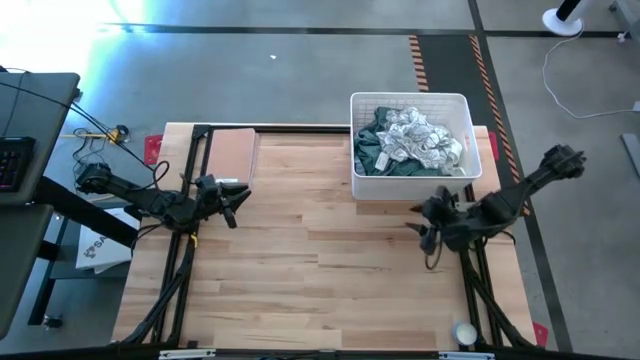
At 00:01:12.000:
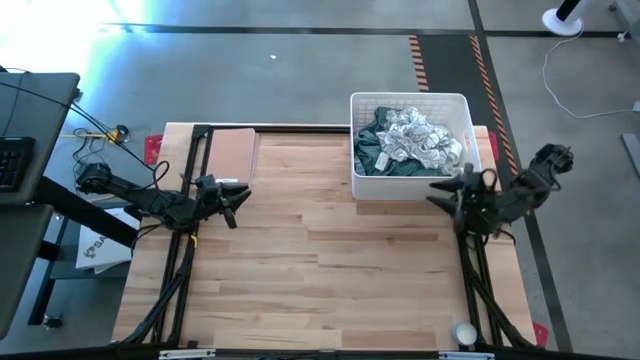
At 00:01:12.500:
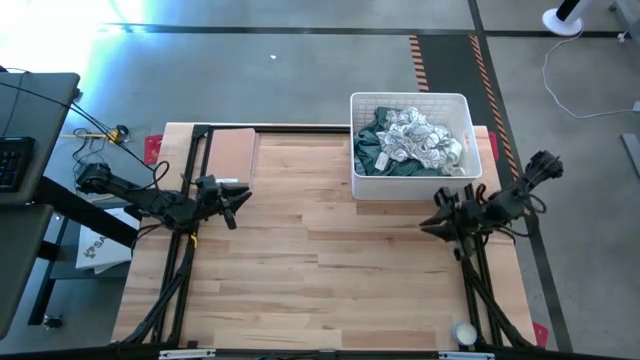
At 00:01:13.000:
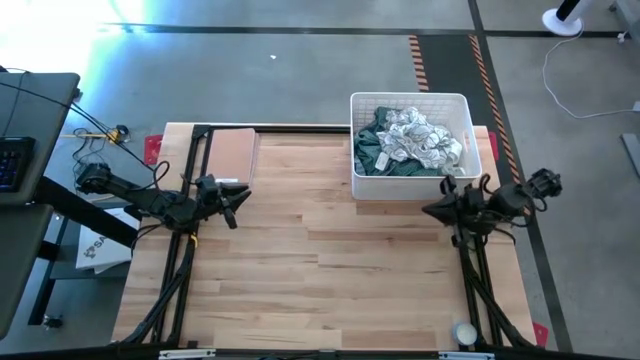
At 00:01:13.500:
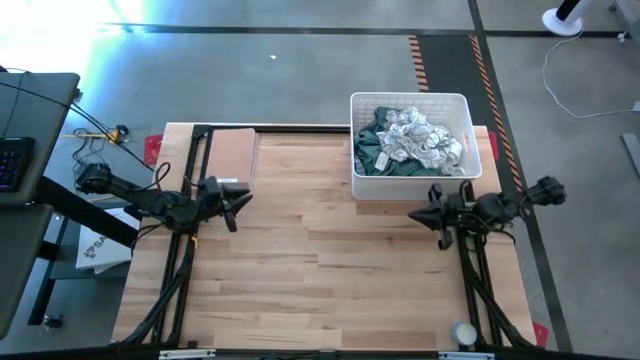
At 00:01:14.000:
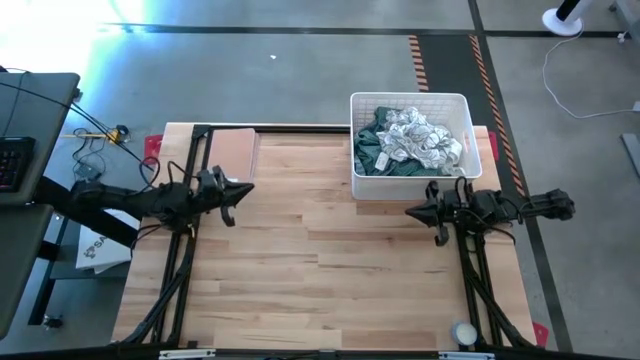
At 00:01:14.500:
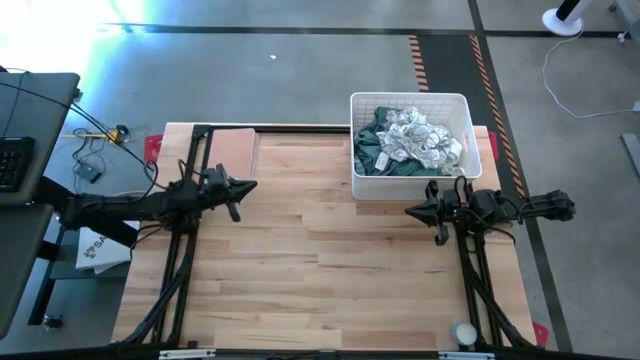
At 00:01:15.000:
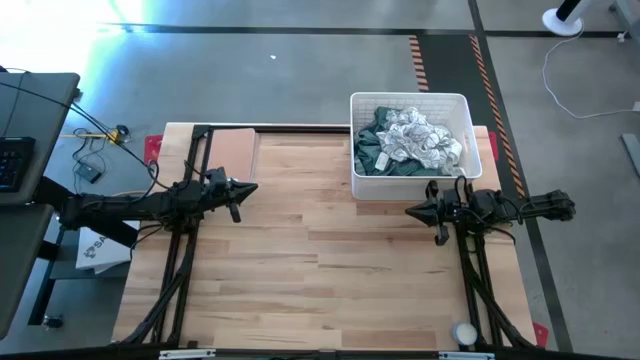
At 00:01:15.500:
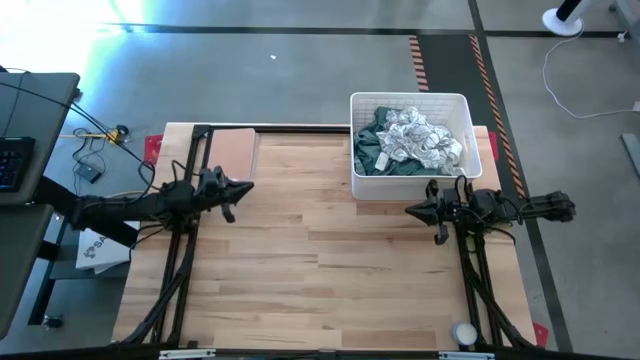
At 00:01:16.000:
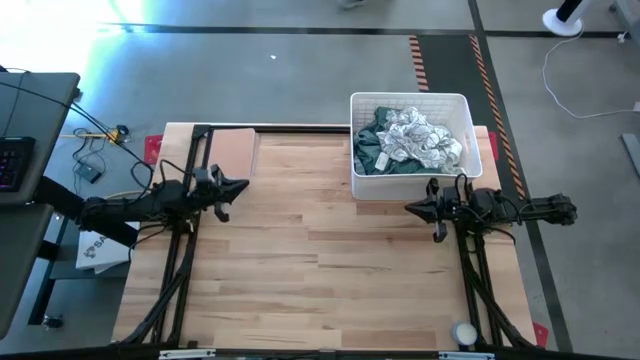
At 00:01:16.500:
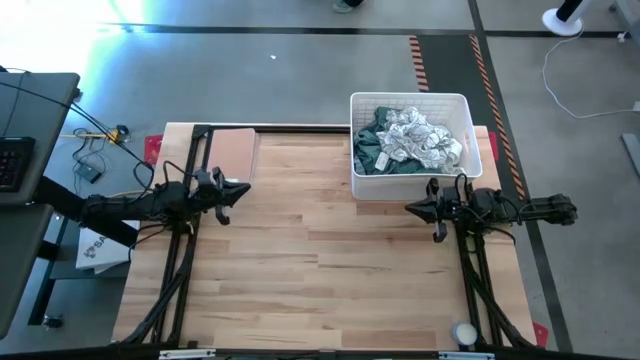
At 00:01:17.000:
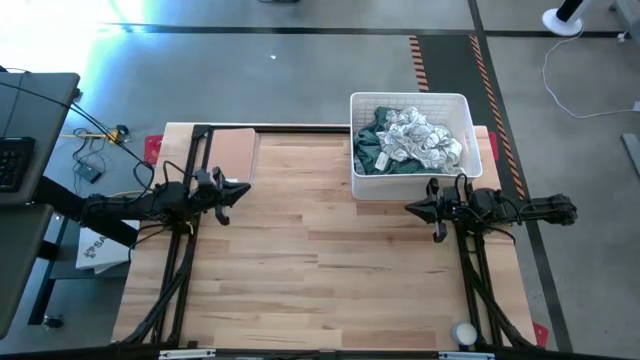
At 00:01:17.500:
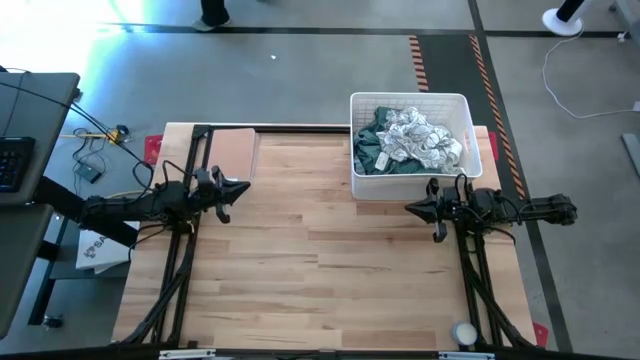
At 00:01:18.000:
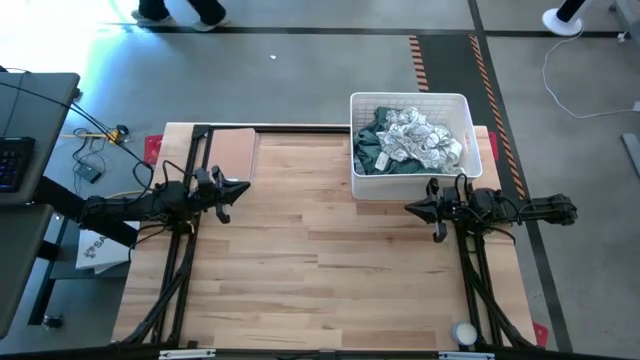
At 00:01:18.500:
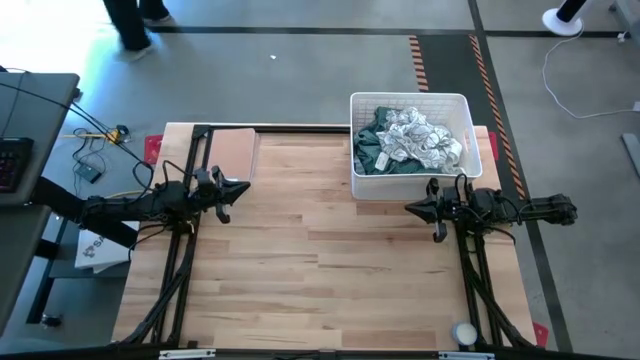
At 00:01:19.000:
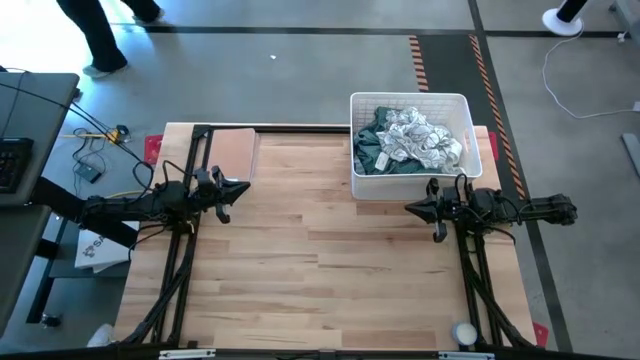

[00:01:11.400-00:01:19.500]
Task: Sort clothes
Return to Home Position
